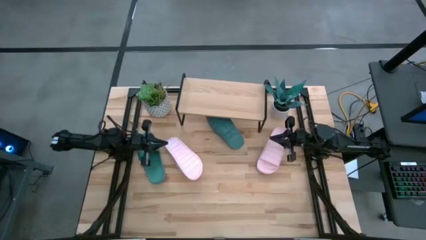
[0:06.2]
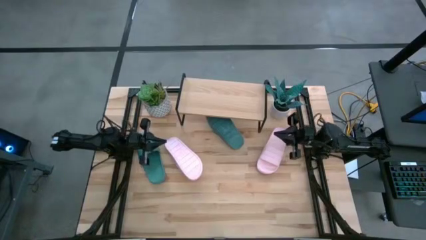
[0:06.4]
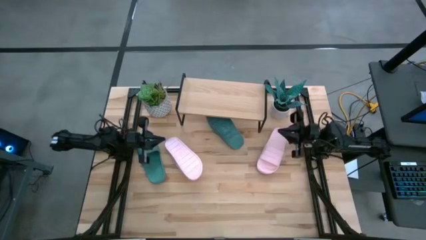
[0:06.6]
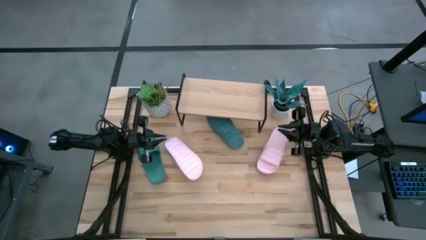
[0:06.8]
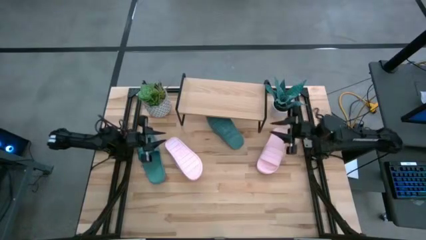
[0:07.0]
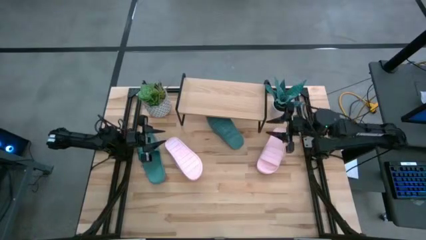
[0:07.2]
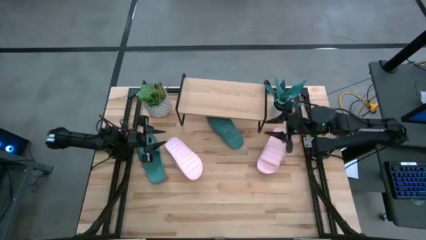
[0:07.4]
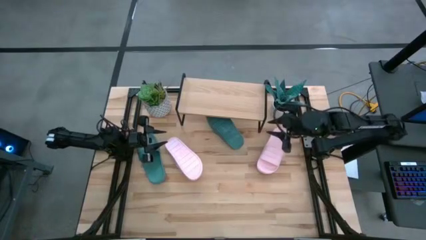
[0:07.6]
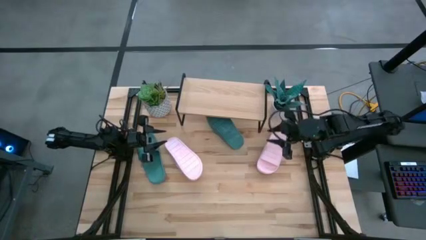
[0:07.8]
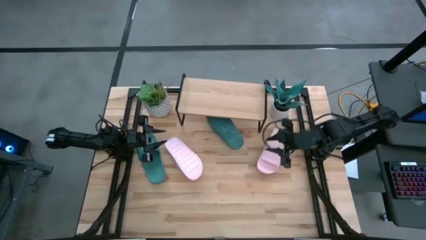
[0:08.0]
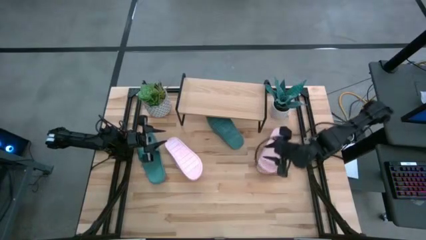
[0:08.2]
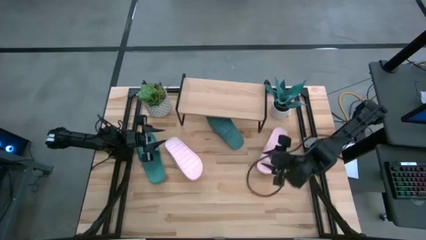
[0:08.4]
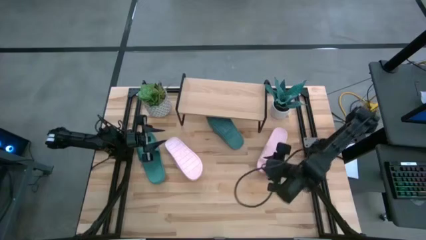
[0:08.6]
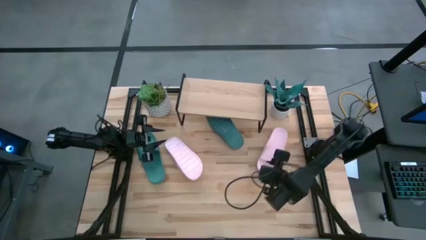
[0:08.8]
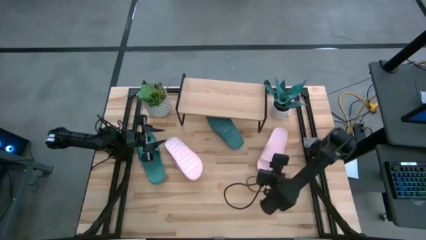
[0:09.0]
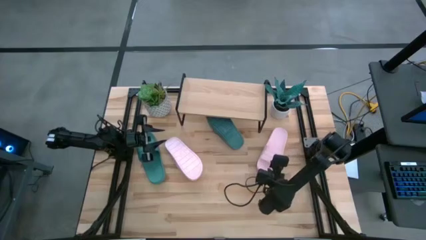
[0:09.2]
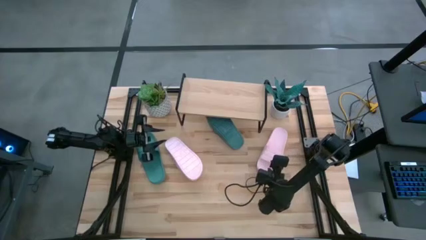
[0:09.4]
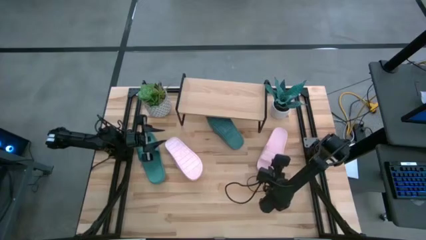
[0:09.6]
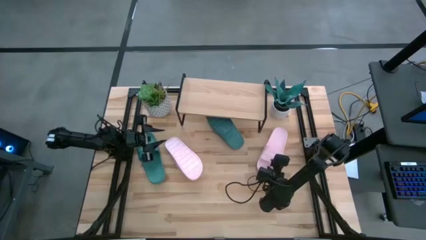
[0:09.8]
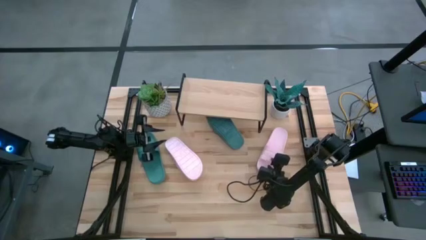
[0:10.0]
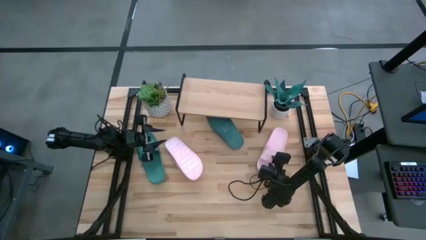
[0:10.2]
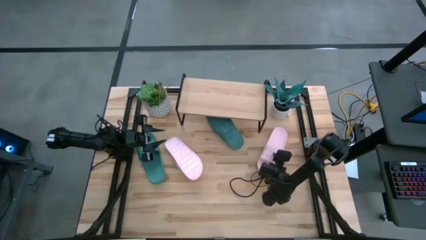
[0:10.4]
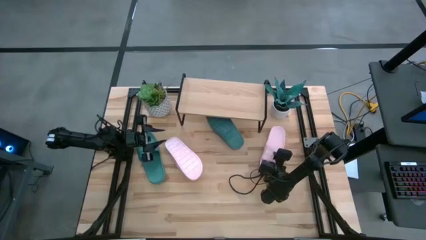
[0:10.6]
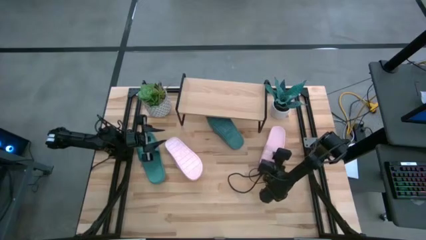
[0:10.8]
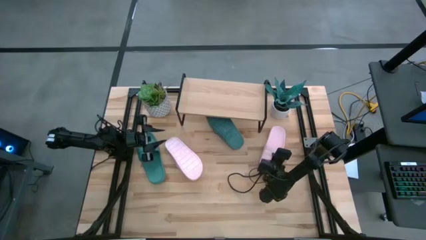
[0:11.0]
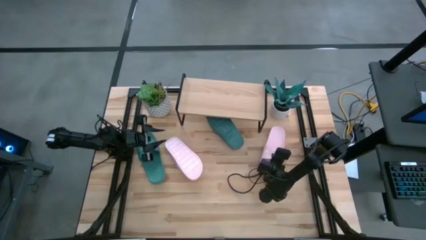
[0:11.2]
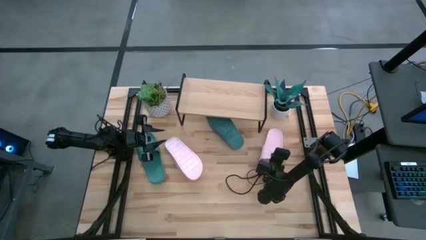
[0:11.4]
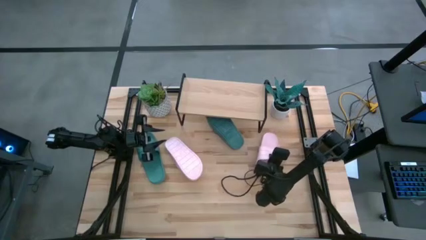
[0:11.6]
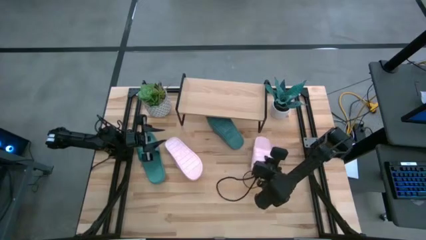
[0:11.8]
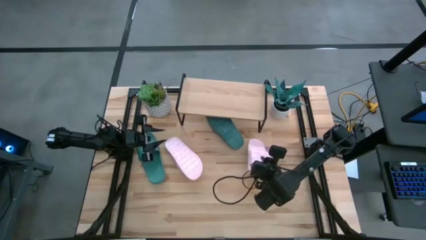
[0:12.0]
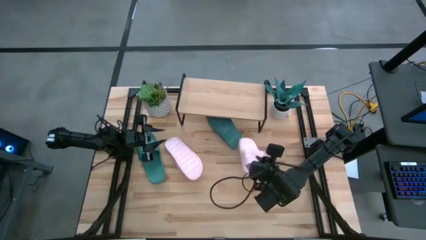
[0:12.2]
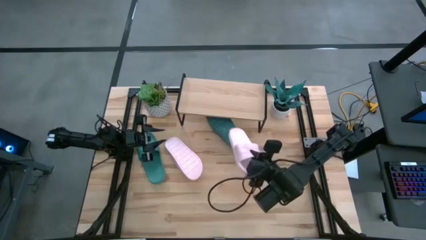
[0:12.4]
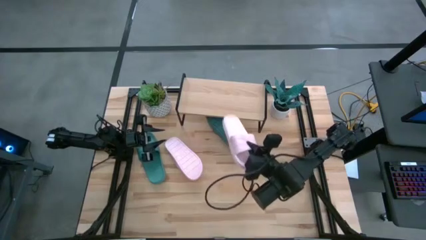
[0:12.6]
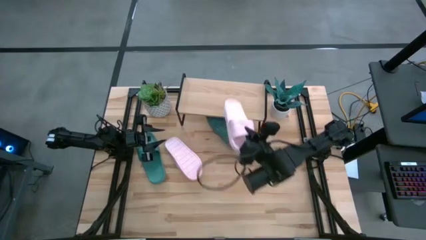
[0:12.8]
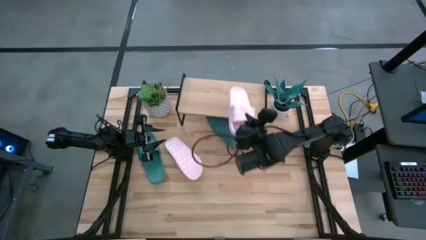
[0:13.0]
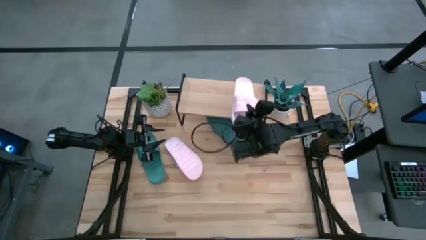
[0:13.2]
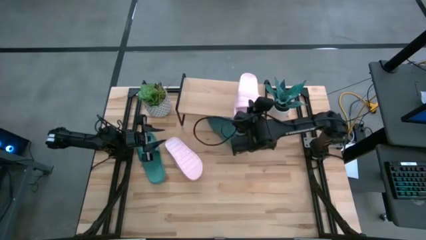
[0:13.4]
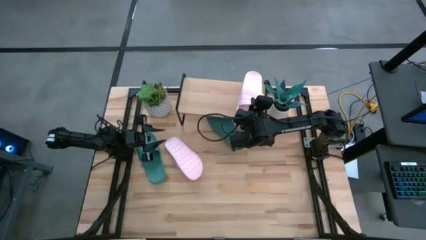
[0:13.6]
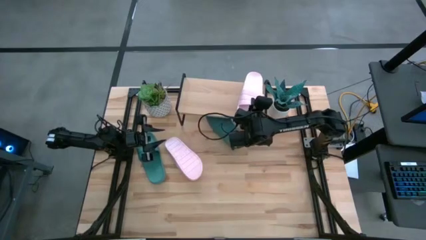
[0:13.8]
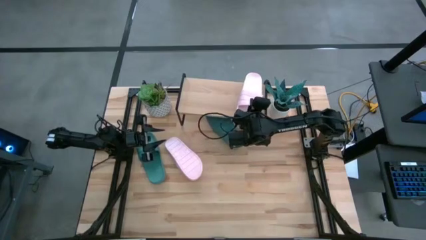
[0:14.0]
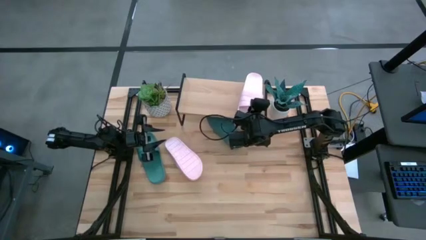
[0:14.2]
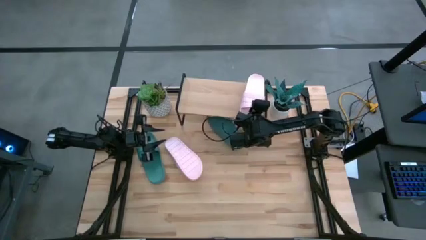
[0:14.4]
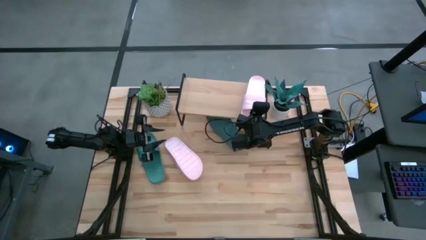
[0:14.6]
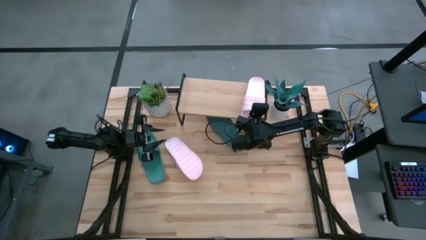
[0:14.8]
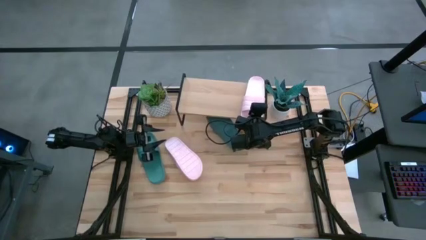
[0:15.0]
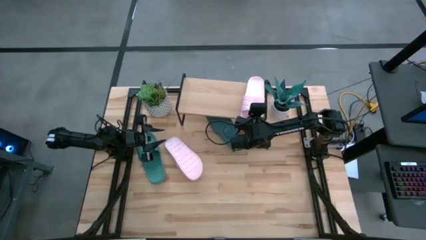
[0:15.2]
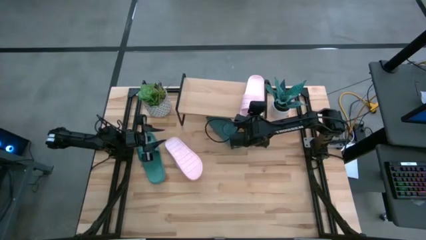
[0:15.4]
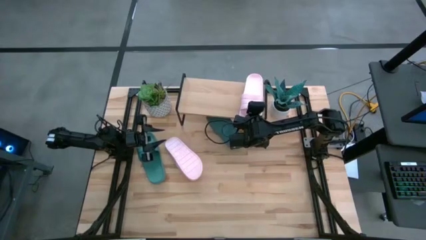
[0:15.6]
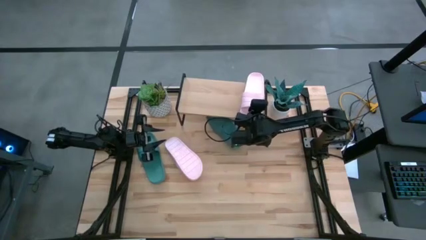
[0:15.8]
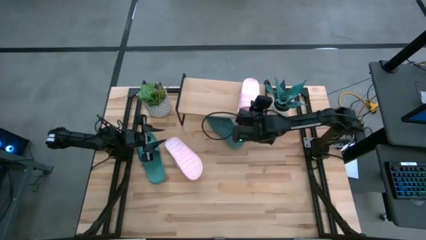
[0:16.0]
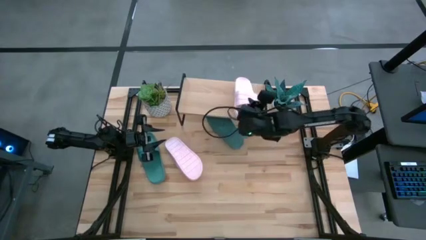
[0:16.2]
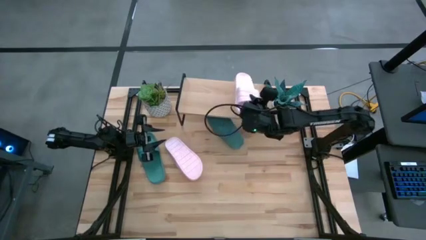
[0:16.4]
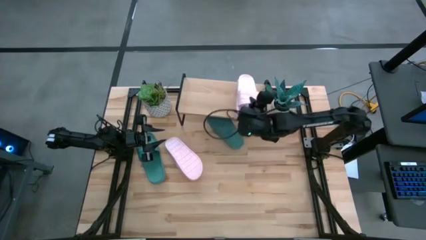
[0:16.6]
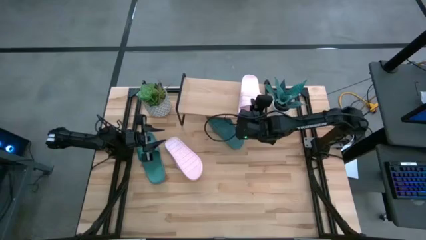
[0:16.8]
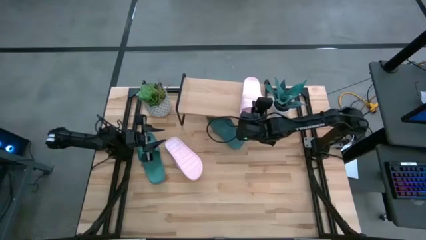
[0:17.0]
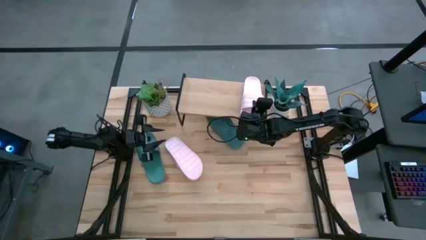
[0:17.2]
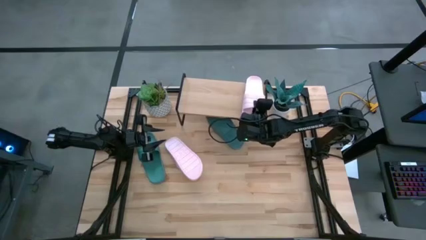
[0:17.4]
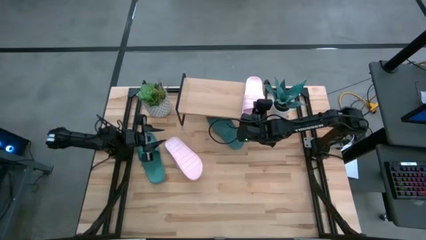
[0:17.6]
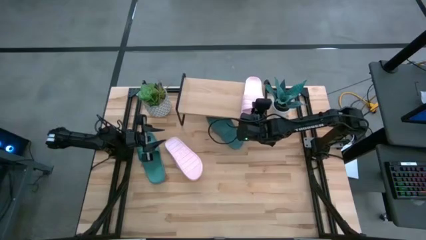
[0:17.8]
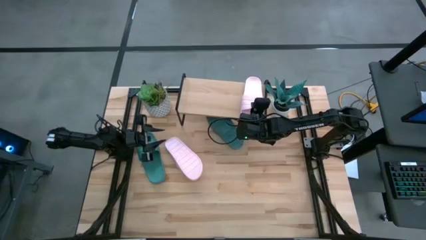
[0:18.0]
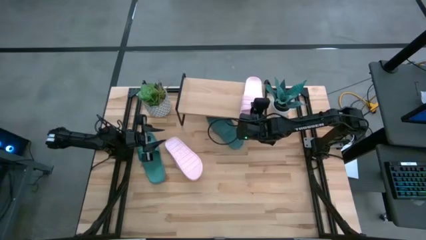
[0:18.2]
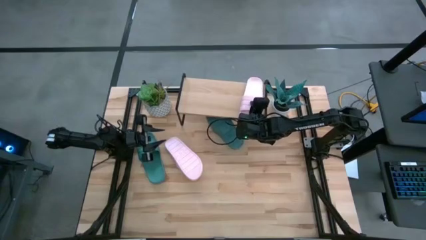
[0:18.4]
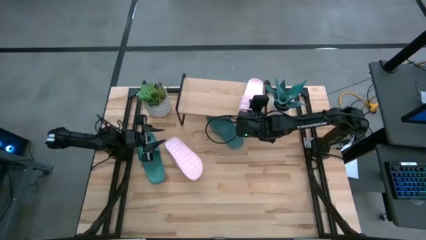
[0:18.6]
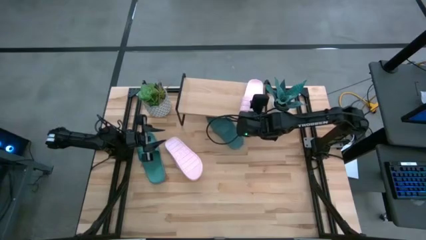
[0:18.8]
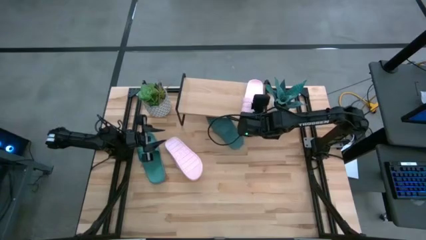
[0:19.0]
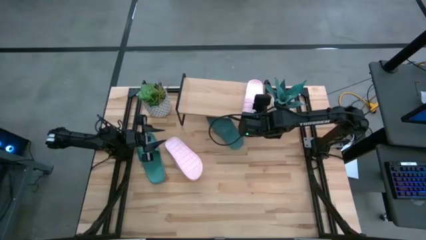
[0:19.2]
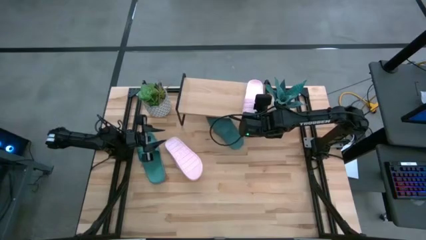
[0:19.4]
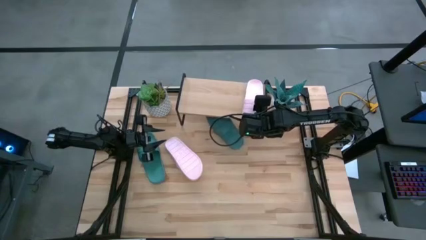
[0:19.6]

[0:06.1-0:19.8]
Task: Pick and place slides into the shelf
Put the right pink slides on the shelf
